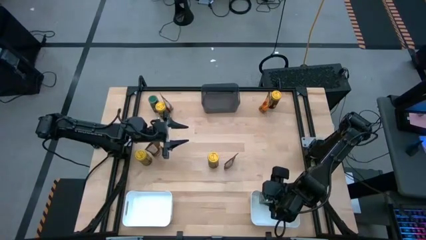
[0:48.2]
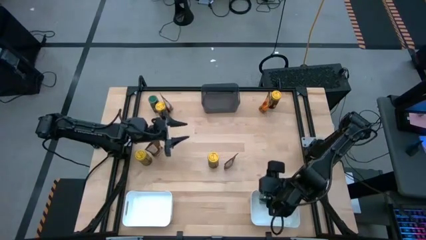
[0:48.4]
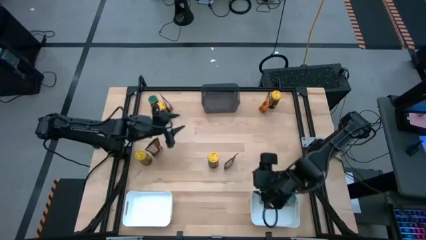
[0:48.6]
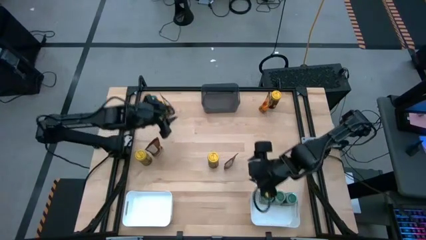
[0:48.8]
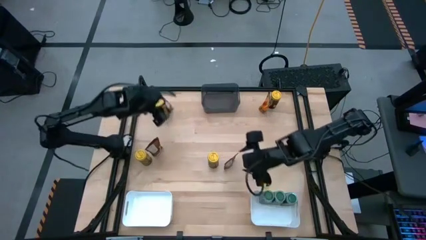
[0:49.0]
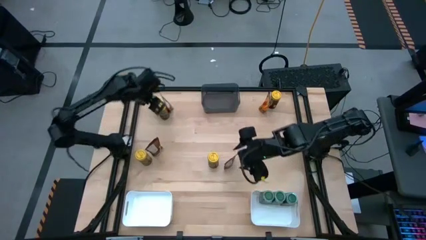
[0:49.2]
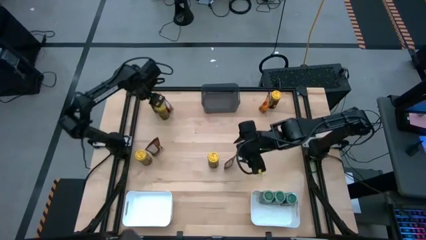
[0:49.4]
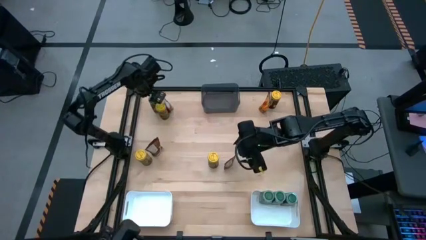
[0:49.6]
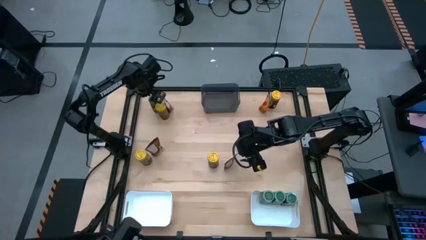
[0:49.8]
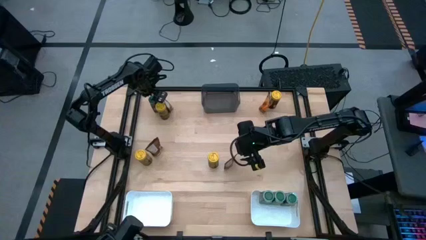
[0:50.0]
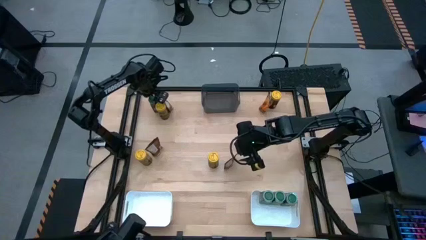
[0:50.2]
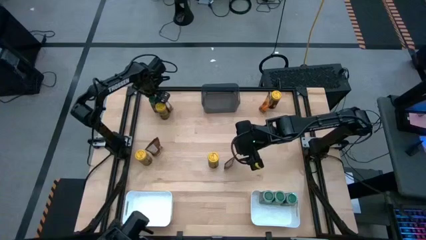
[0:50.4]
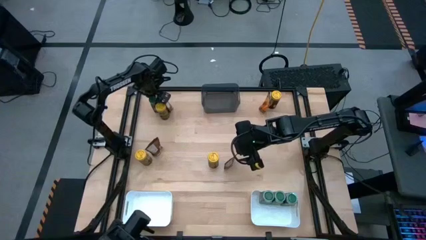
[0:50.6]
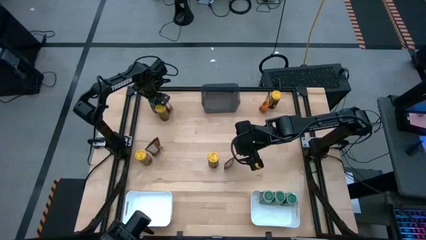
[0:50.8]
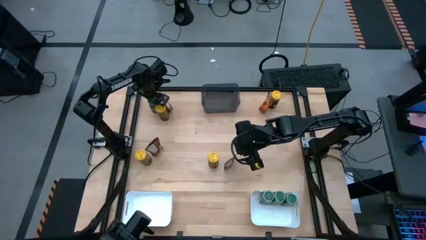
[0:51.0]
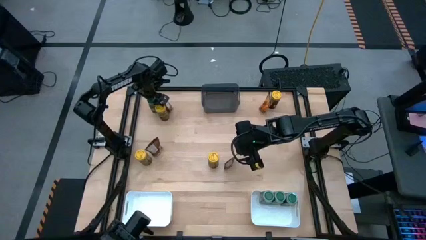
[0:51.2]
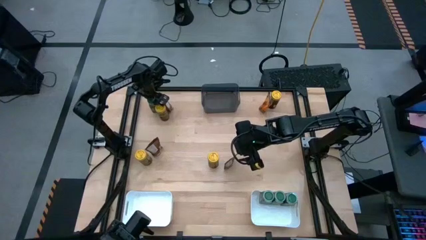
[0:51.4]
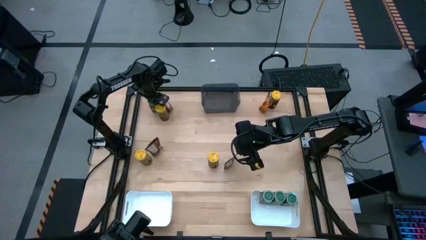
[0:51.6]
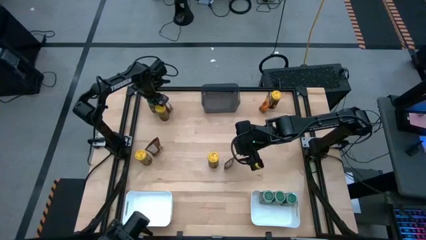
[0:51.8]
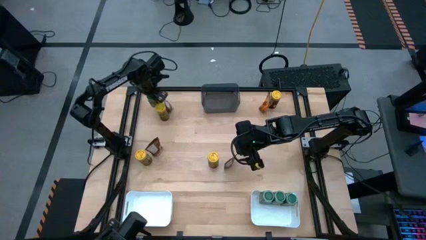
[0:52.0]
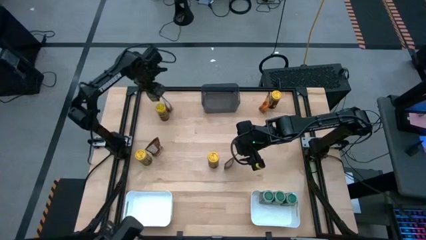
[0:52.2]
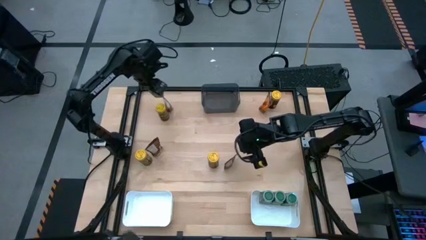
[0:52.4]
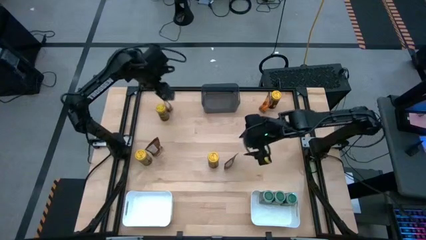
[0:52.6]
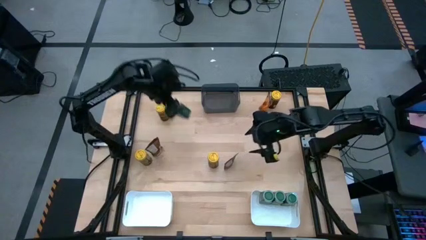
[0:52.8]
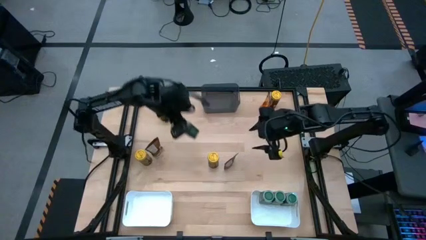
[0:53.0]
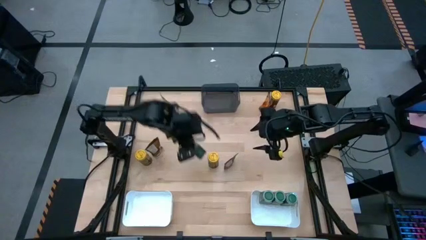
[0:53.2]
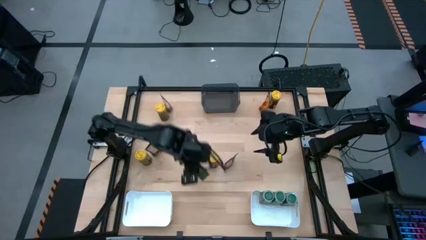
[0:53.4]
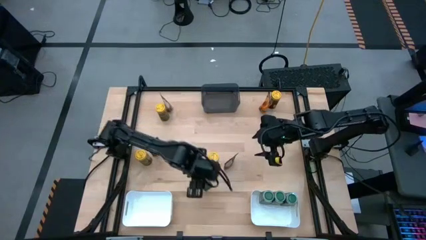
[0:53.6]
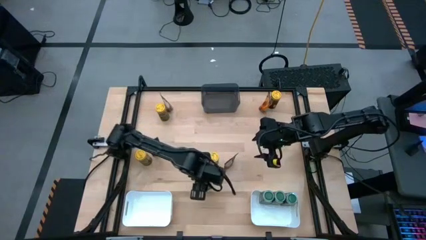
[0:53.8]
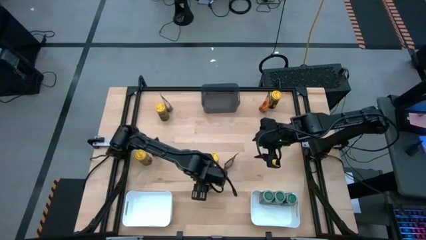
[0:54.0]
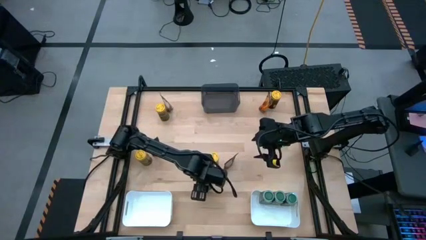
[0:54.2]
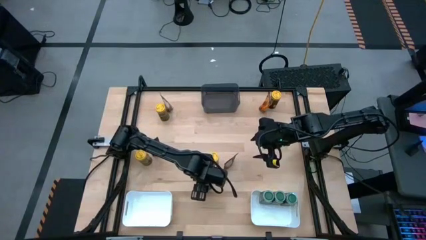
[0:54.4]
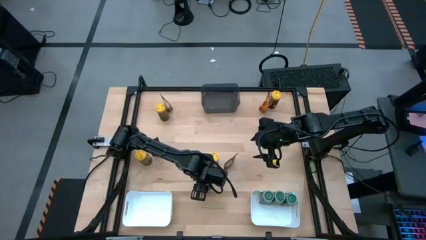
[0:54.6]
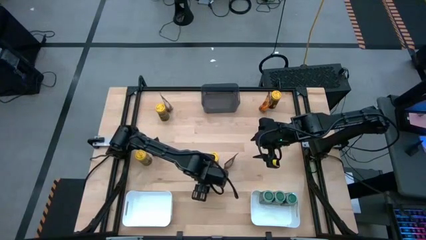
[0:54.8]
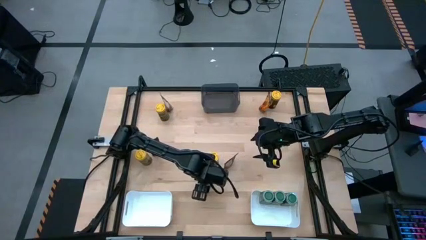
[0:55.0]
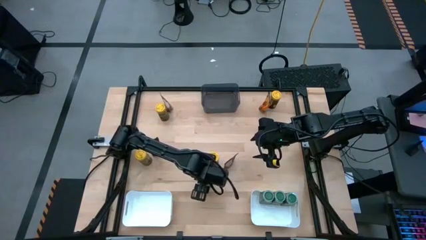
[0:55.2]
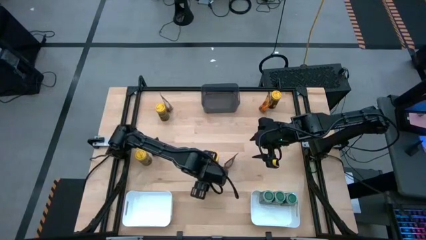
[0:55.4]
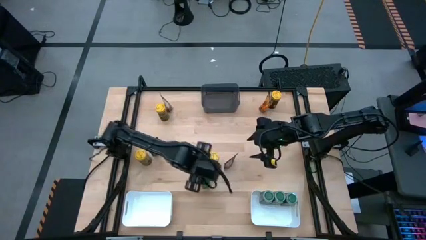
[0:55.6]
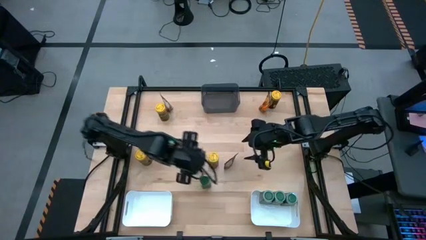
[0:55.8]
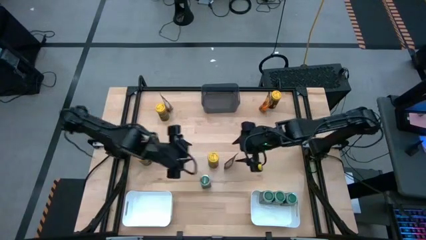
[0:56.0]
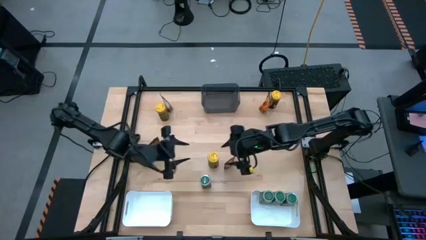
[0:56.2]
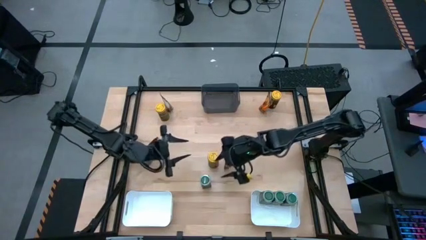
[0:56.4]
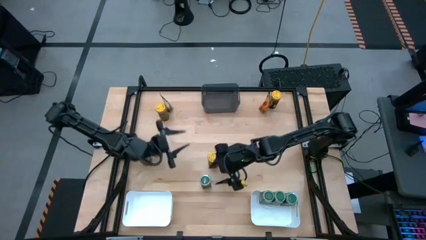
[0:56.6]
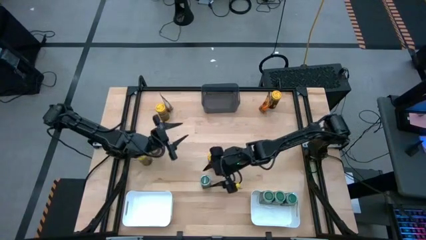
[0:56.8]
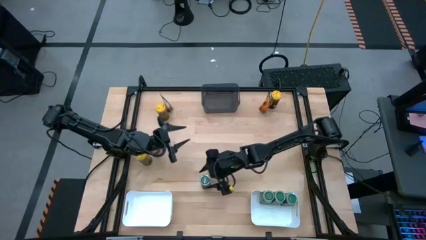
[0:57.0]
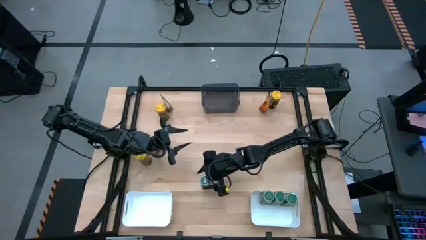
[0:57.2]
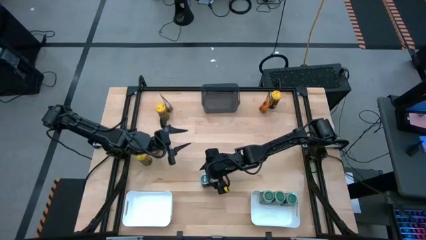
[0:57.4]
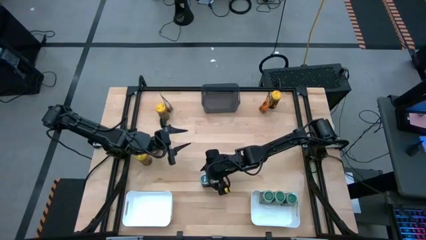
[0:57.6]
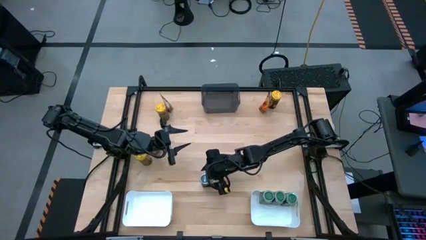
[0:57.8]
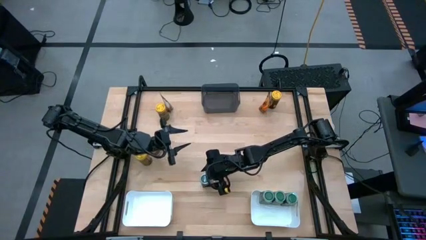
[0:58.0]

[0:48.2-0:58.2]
Task: Sort spices by type
Put the green seasoning bottle into the right white bin

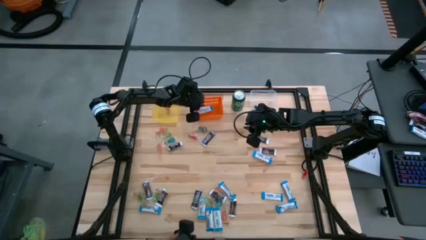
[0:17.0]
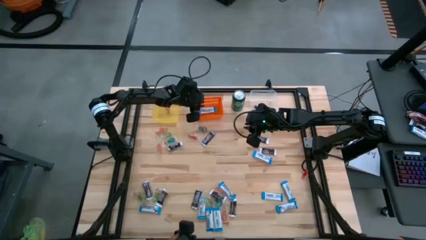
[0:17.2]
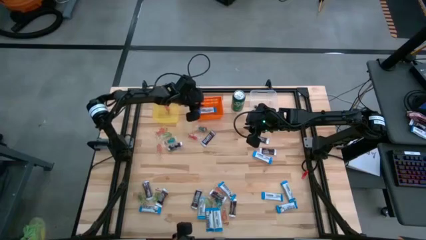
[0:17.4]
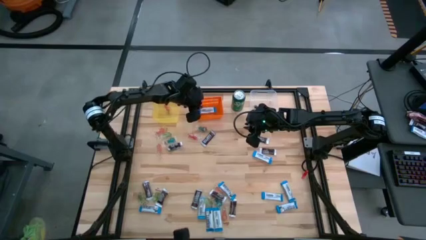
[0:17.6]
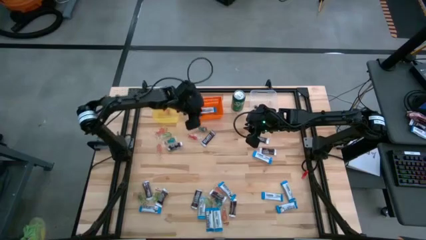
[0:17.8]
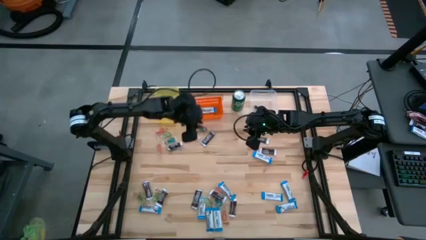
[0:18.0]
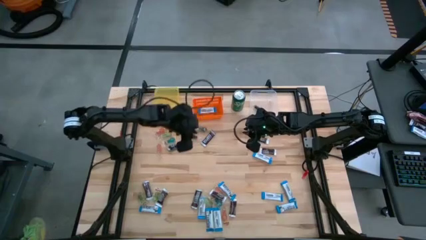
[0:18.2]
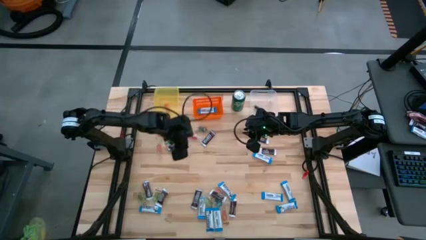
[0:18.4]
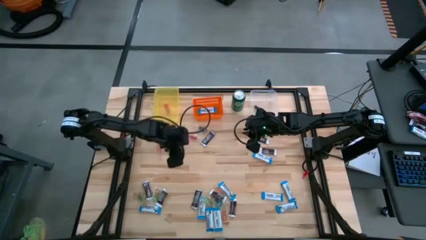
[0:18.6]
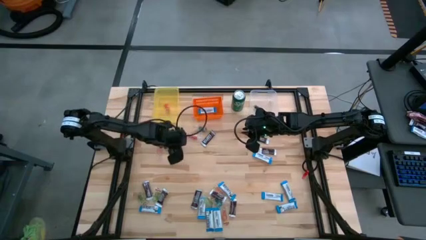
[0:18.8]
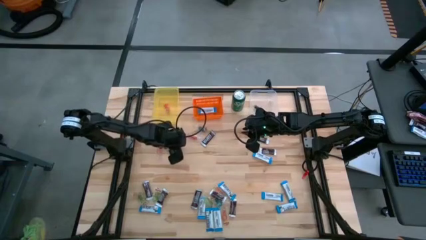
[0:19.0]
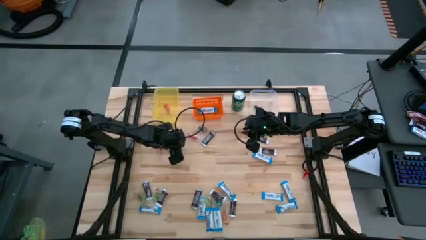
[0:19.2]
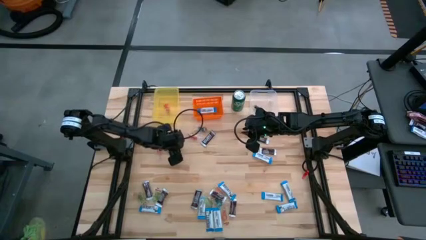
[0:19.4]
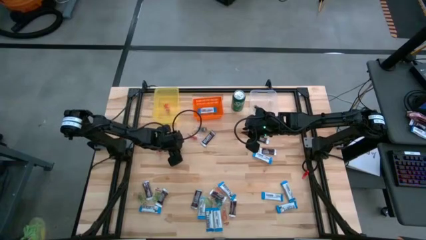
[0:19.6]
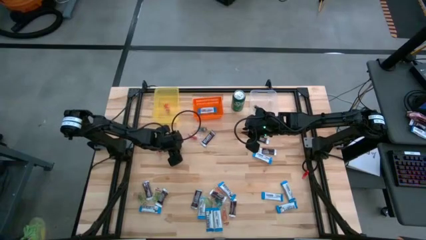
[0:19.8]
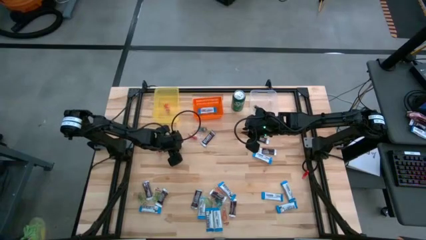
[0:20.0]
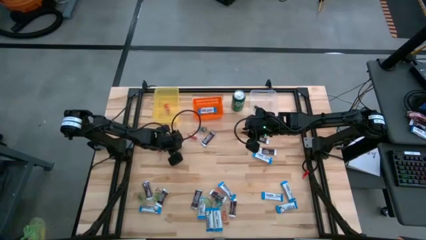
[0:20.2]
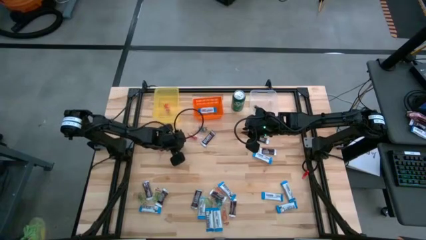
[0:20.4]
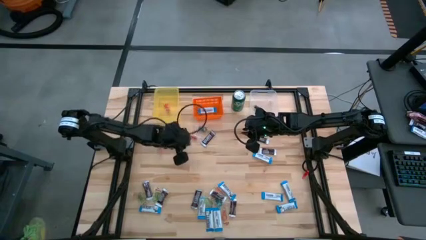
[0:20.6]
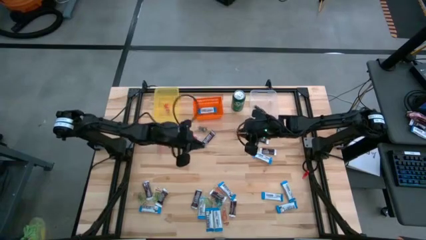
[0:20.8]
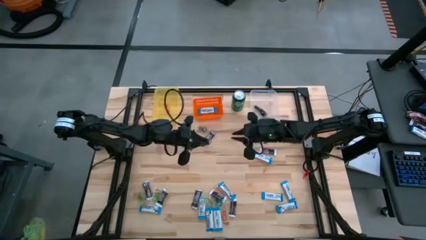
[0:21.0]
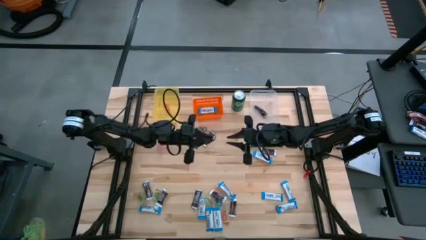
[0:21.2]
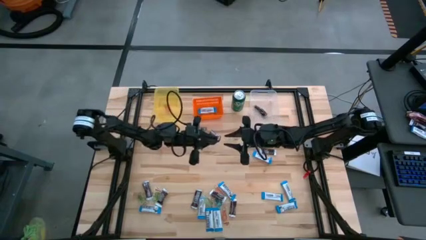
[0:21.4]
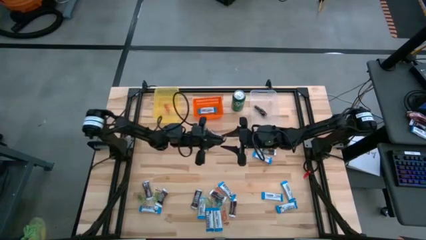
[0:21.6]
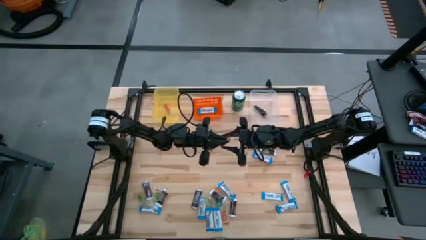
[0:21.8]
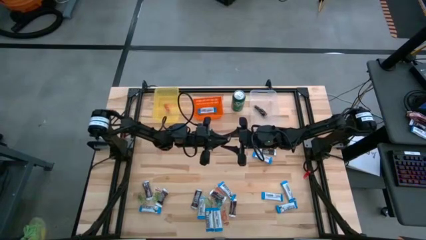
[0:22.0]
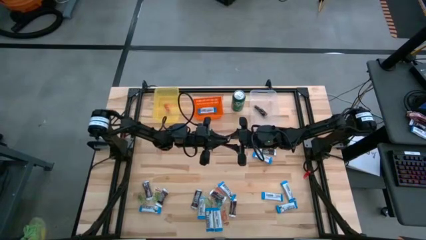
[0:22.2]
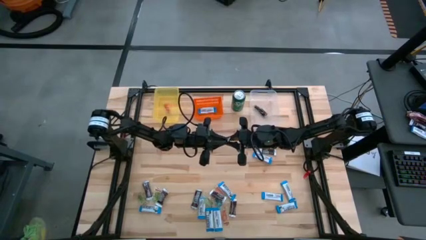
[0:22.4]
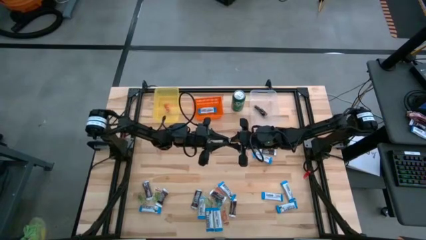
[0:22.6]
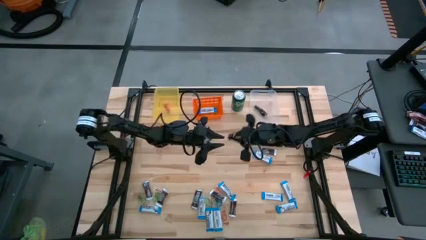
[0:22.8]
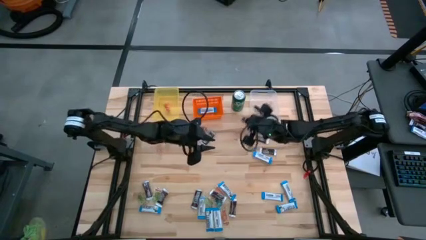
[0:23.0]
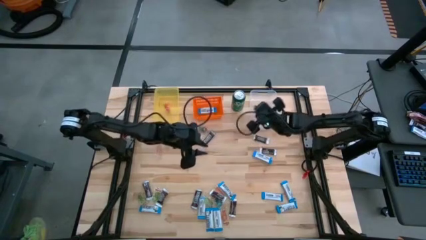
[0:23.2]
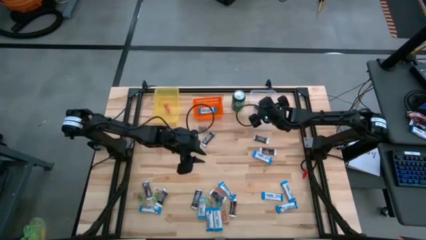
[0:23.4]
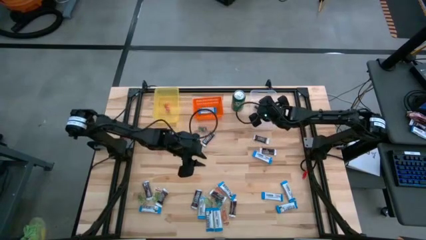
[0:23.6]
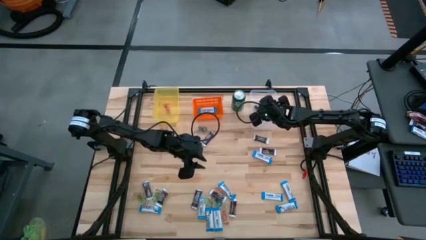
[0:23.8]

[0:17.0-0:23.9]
Task: Organize candy in baskets
Put the brown chocolate into the transparent bin
